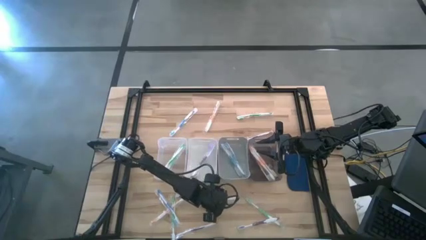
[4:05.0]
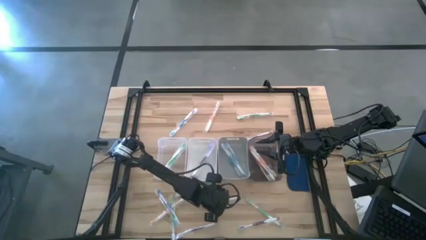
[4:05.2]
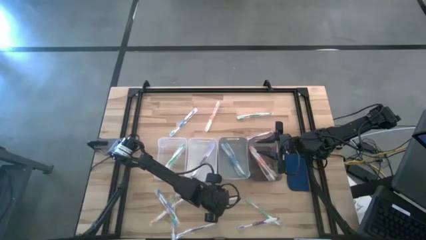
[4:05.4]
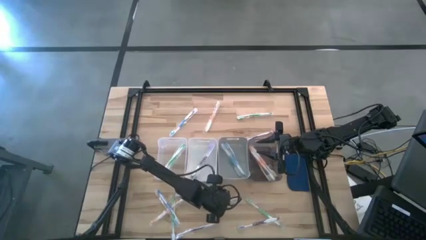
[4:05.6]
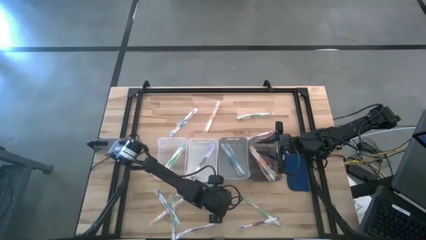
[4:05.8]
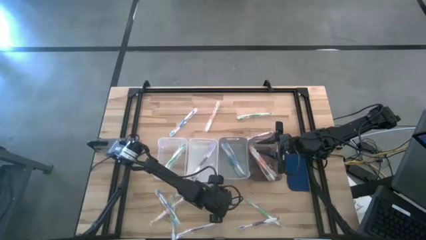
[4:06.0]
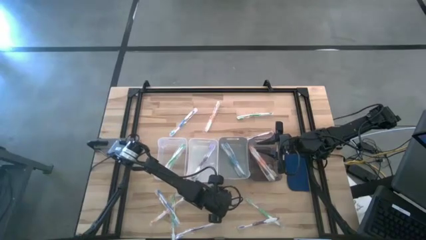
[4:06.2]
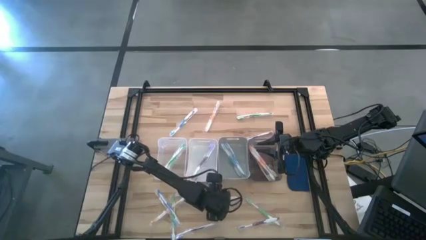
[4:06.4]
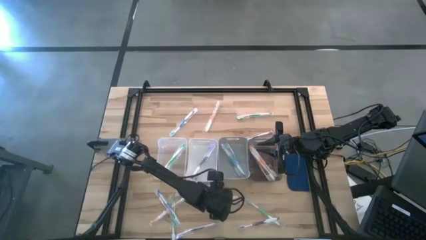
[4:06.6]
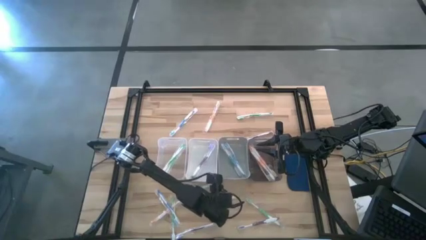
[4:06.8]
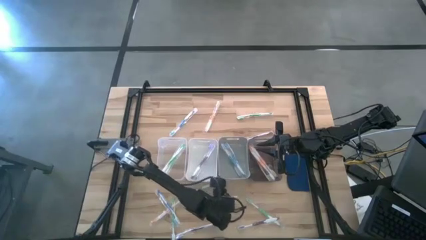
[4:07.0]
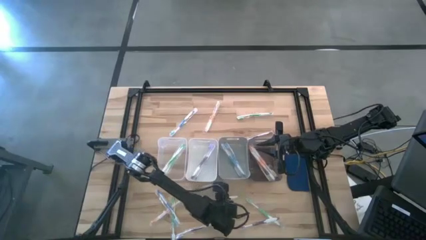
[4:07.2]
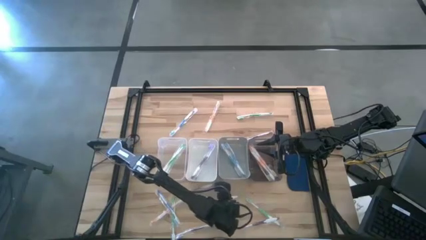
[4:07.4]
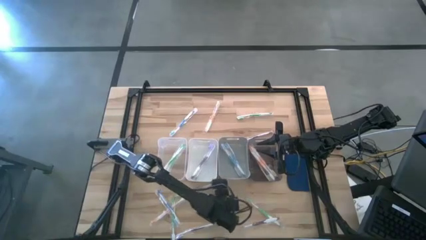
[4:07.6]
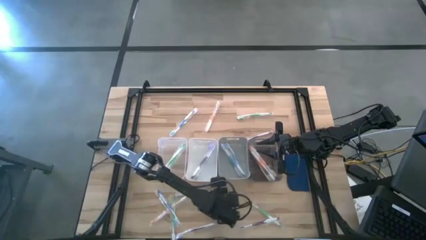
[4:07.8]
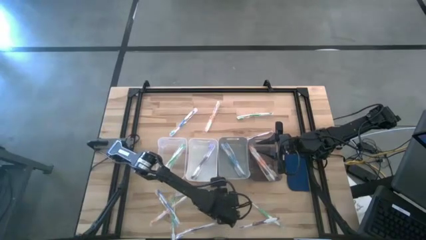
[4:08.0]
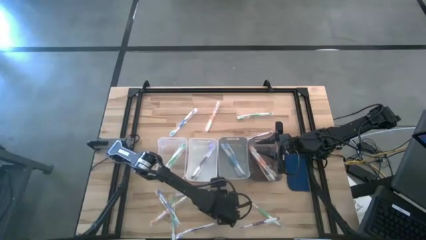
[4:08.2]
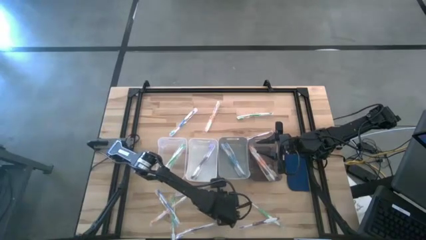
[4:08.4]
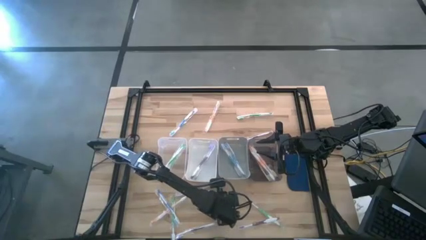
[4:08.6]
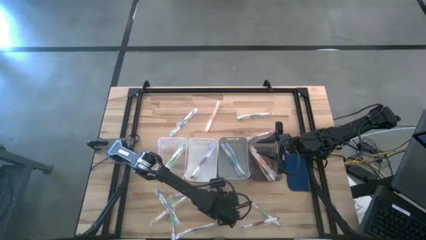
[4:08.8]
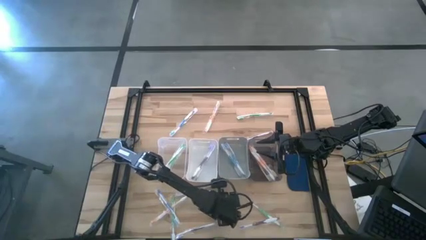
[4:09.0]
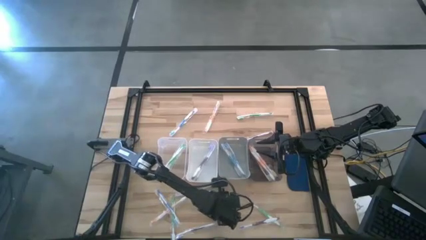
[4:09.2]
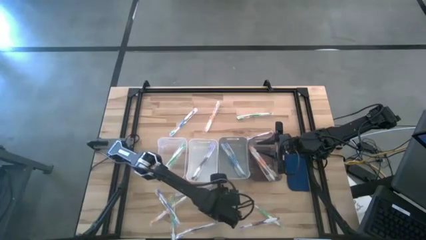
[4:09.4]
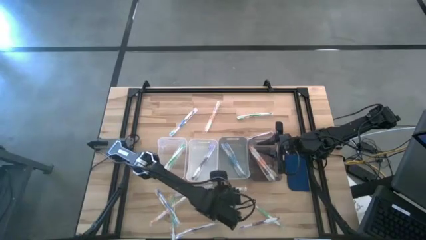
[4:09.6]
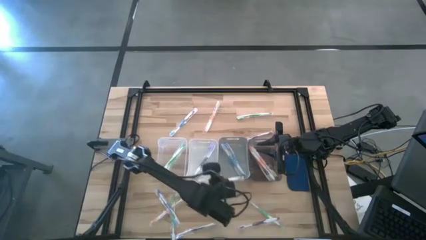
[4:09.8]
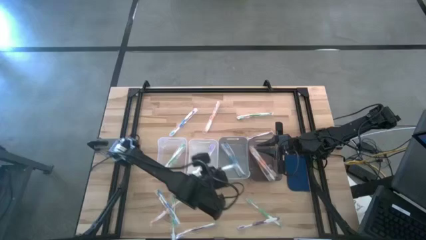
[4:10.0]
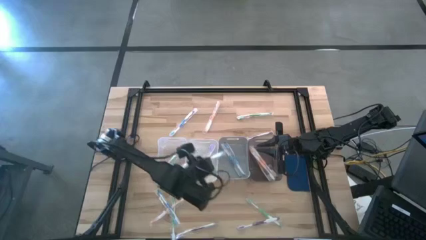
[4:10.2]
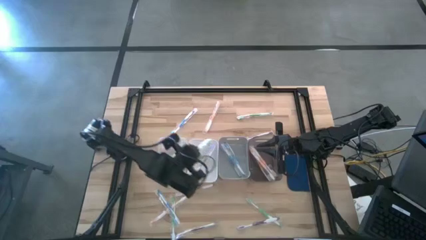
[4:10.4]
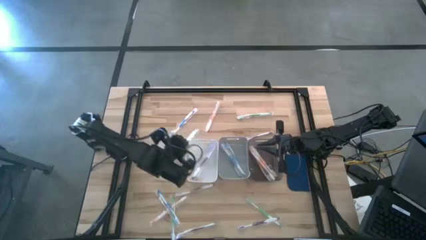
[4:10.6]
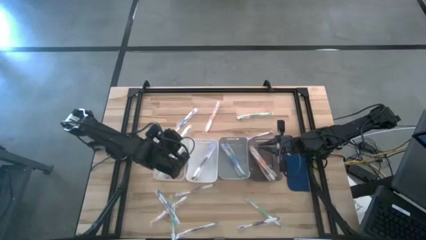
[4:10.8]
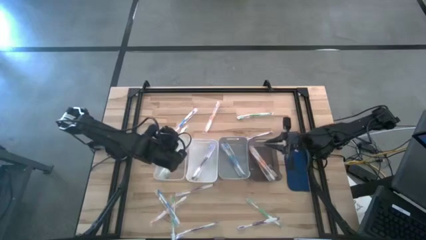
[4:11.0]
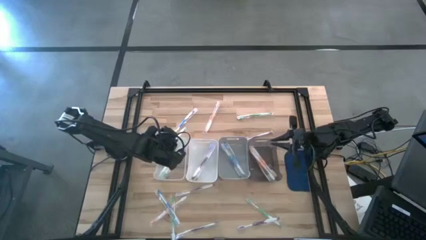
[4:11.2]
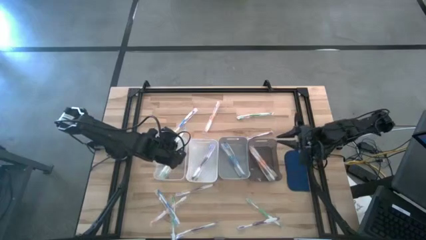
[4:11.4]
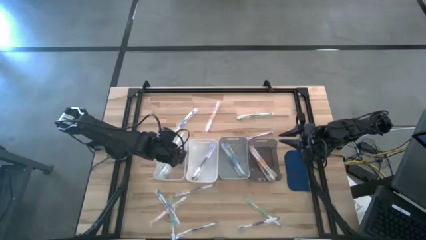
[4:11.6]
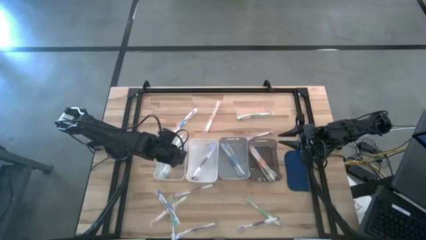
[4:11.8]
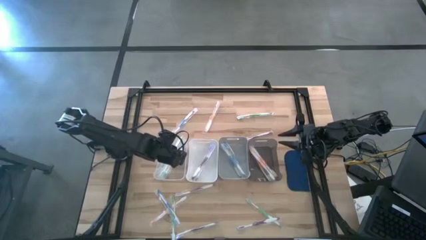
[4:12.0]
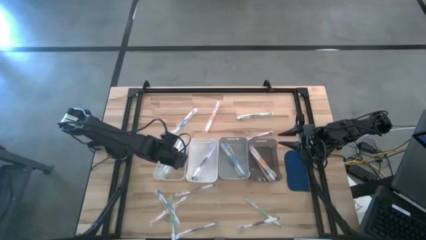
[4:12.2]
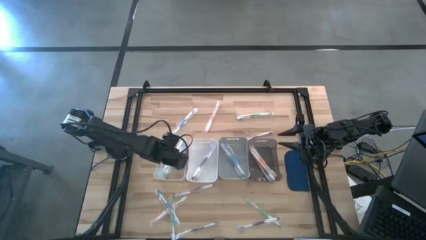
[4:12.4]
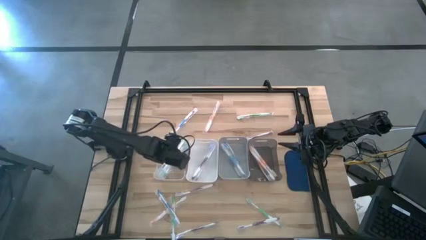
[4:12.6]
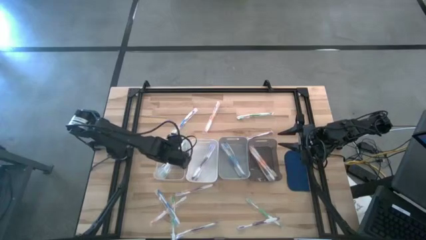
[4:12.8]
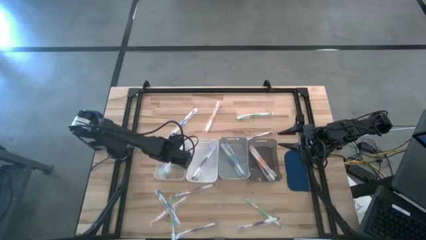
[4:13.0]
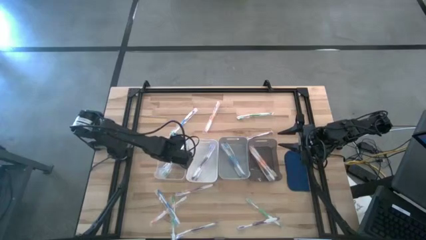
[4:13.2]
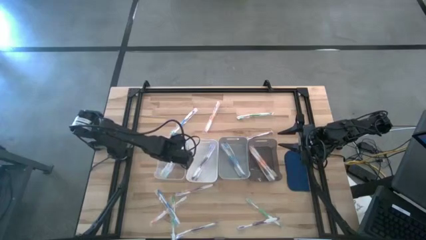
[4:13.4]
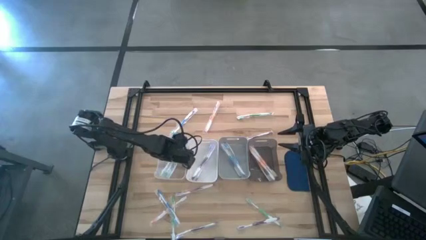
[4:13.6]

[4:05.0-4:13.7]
Task: Pick & Place Toothbrushes
Put the green toothbrush into the transparent bin

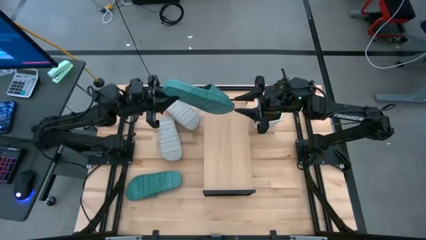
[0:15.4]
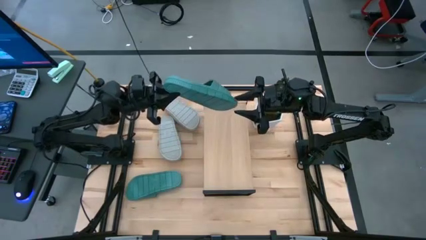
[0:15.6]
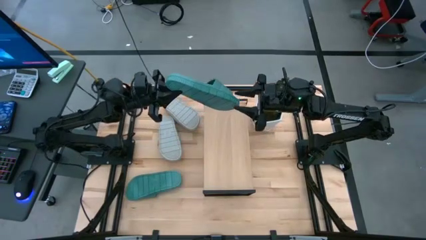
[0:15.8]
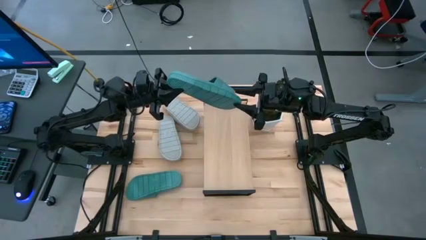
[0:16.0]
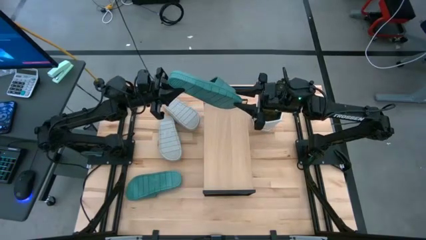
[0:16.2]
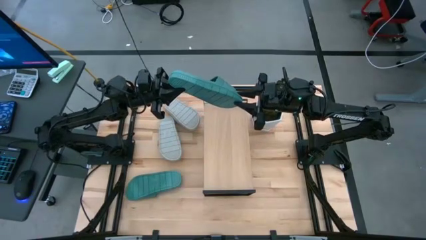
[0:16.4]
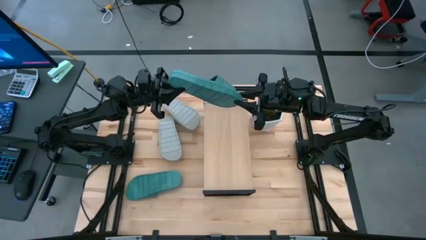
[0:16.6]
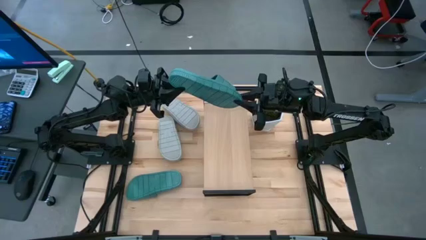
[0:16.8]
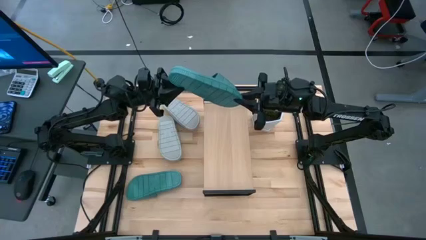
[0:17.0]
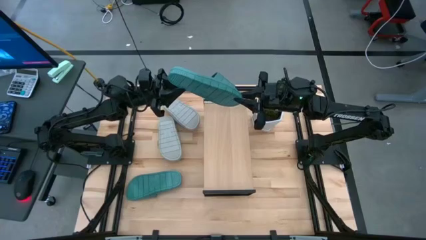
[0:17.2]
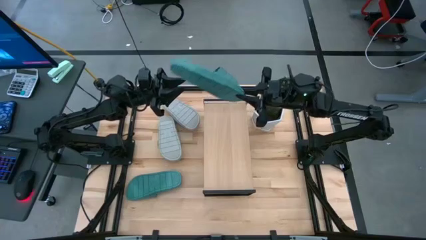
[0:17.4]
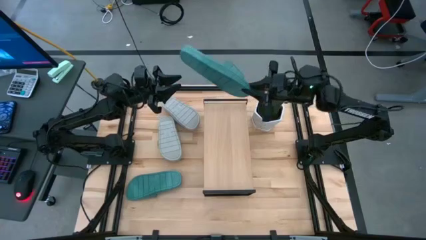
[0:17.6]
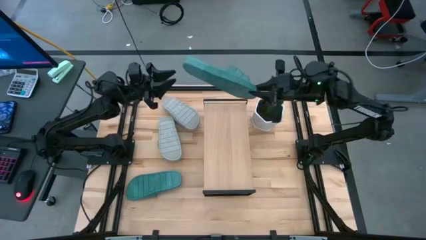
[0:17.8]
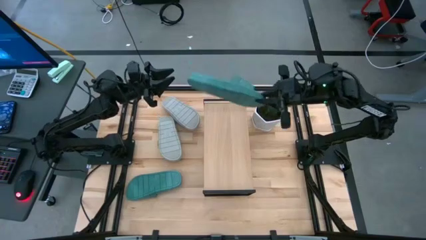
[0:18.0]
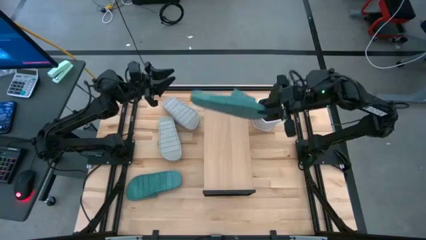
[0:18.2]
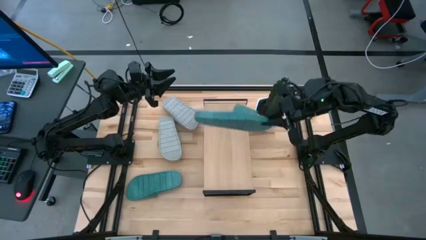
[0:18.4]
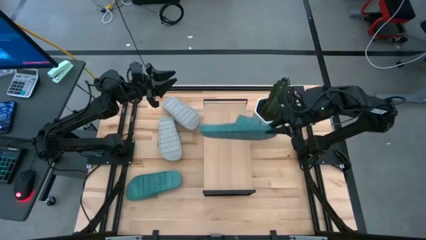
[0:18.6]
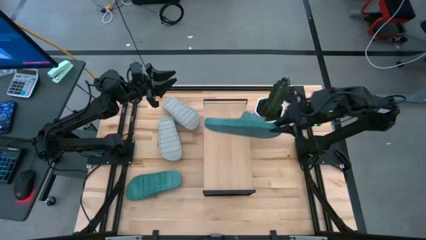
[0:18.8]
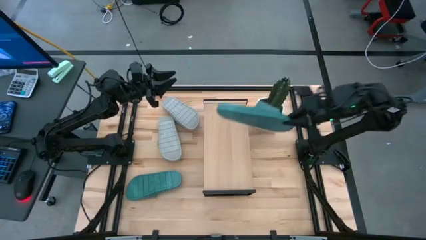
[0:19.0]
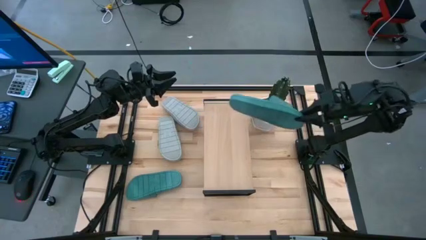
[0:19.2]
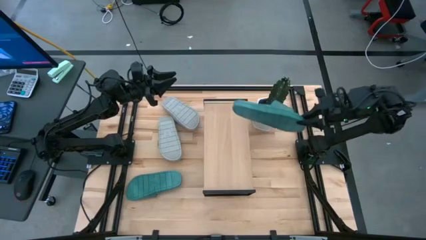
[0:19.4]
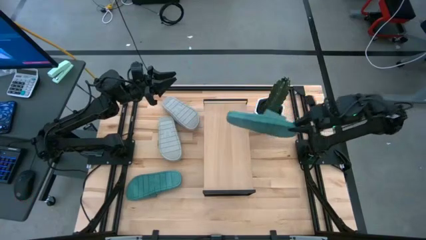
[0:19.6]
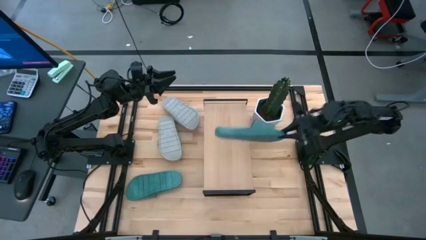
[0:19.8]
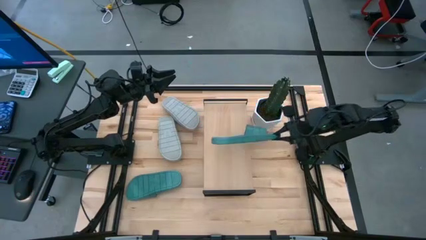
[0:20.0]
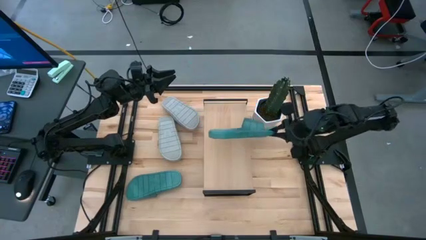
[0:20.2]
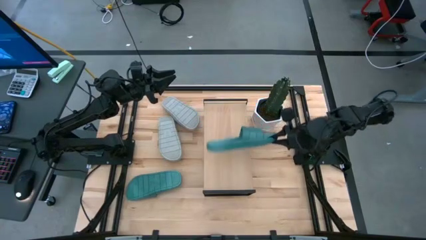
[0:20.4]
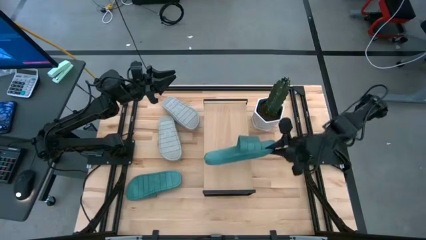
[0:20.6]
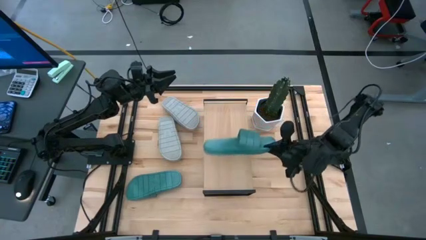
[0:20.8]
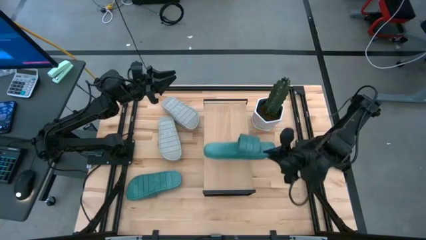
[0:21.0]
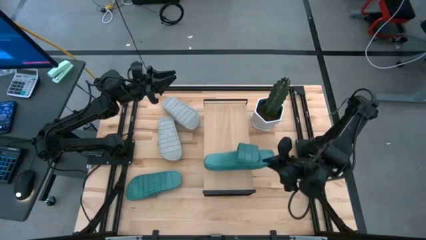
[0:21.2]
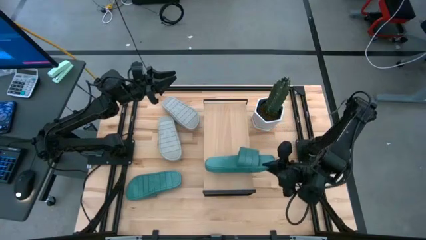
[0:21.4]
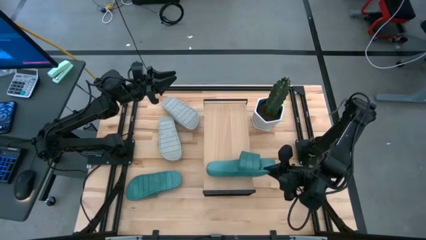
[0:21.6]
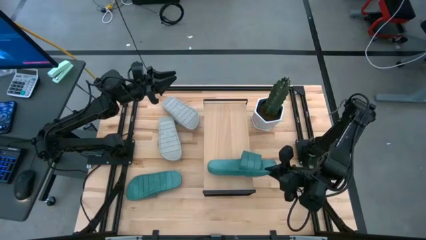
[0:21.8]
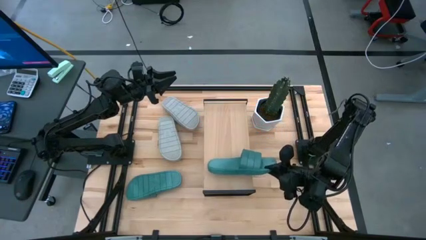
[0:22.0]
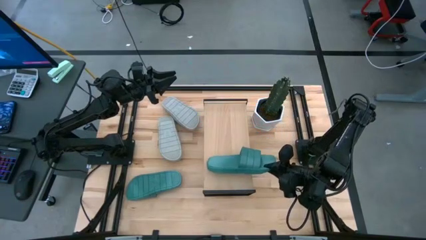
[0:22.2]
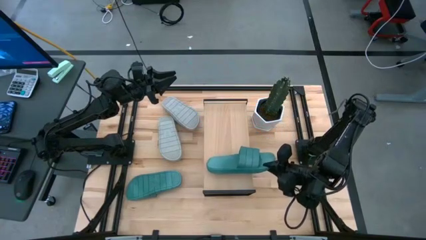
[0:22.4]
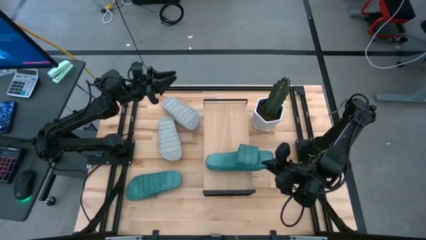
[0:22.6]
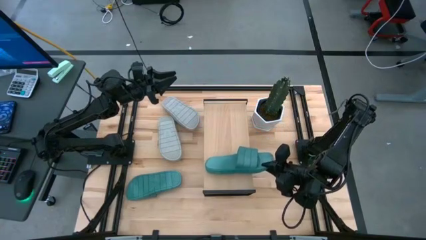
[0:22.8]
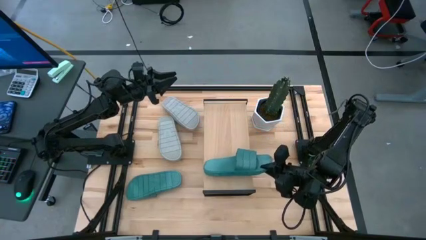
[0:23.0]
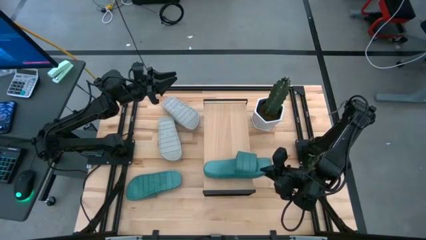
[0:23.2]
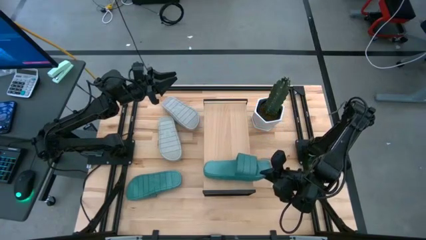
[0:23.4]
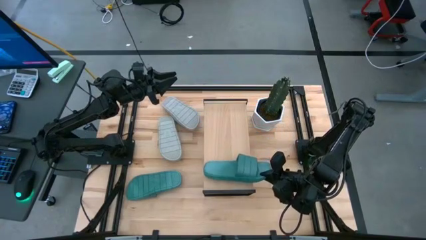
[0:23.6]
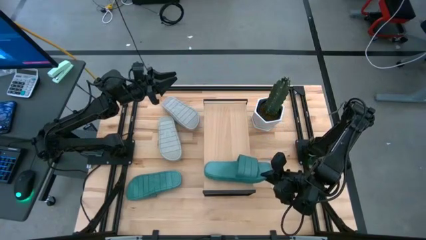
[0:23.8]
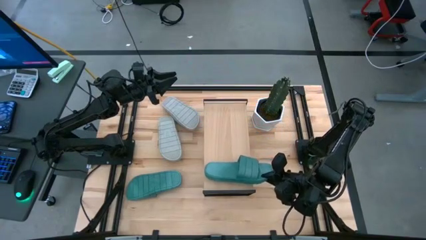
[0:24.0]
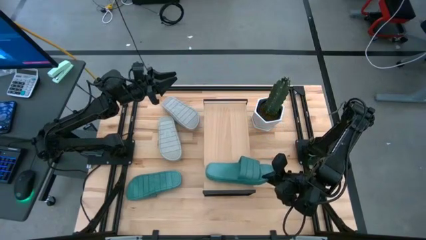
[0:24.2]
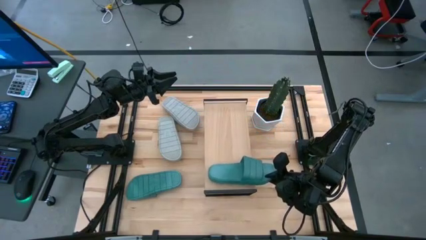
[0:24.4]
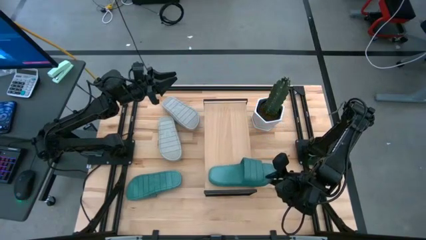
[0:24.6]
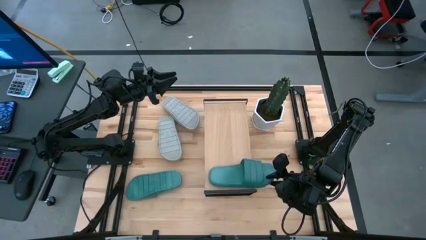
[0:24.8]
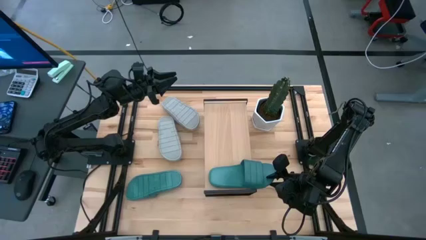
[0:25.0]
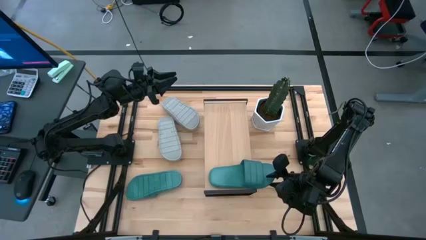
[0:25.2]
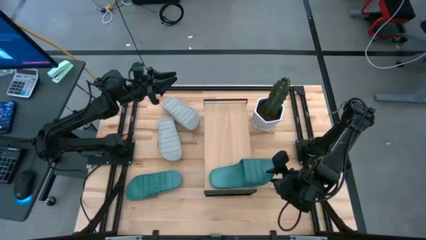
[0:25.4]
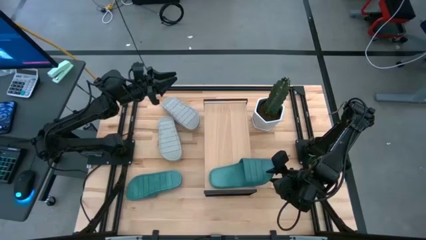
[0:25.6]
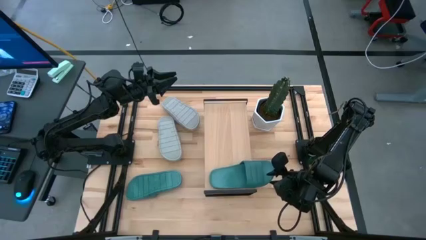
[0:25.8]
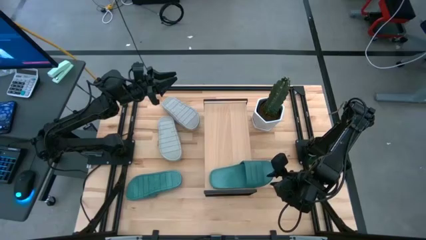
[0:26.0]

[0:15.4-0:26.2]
Task: Pick and place slides into the shelf
Put the bottom green slide on the shelf
